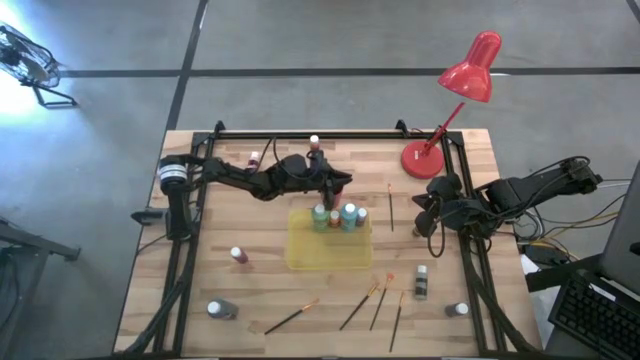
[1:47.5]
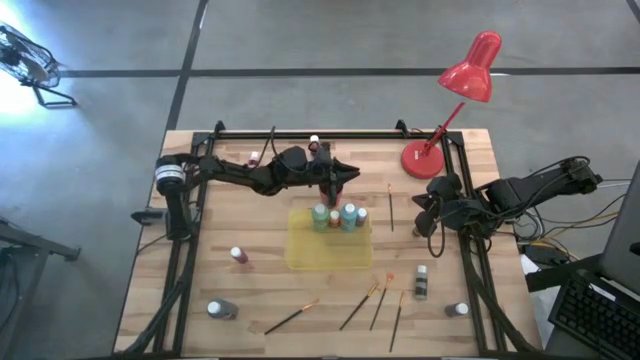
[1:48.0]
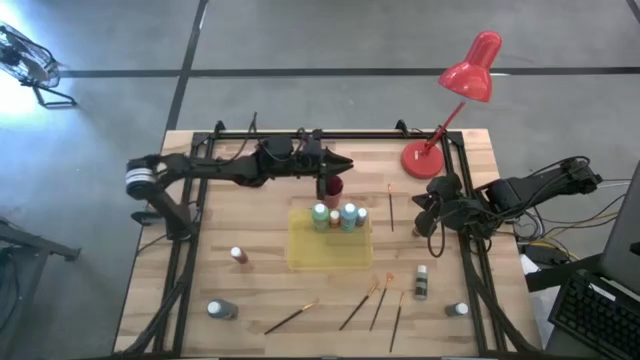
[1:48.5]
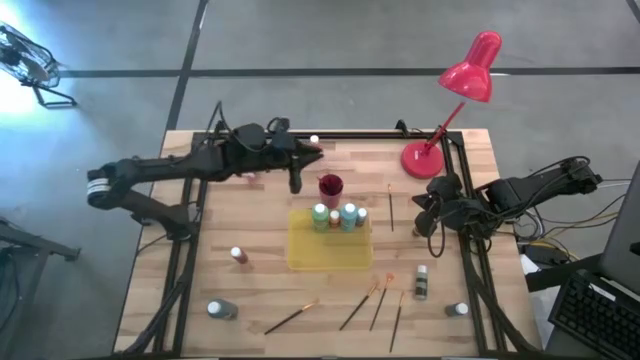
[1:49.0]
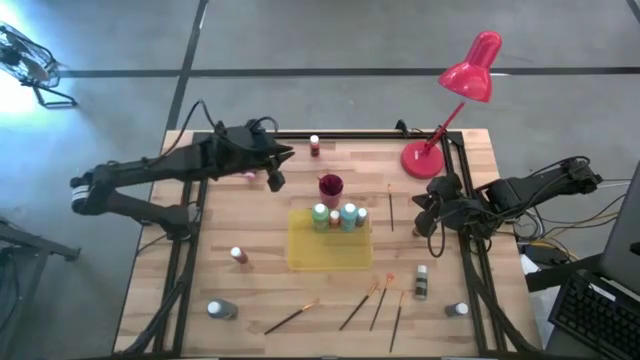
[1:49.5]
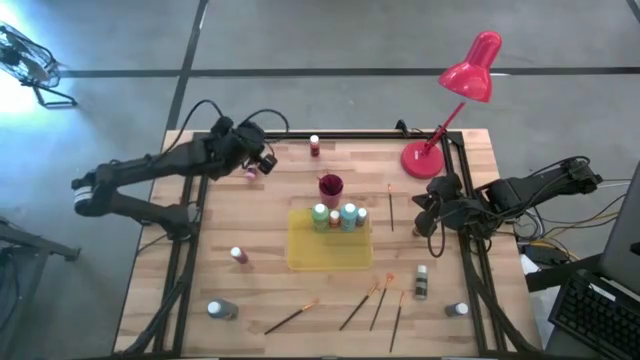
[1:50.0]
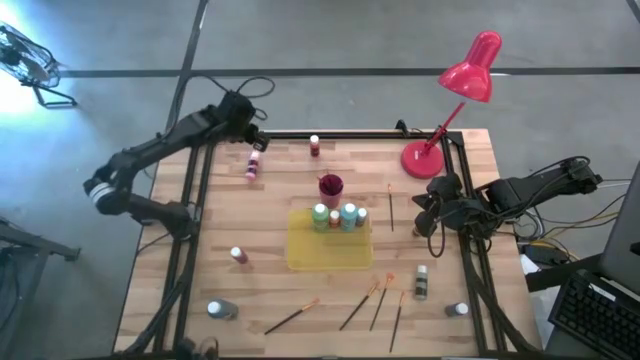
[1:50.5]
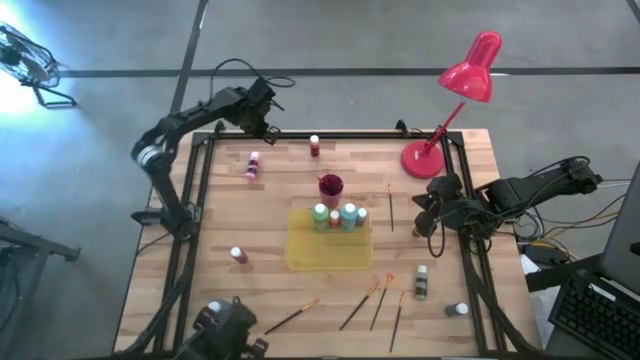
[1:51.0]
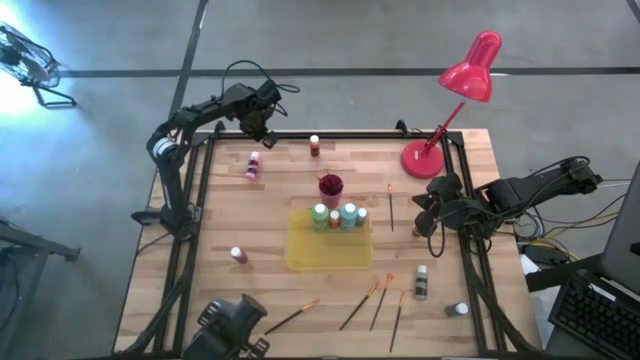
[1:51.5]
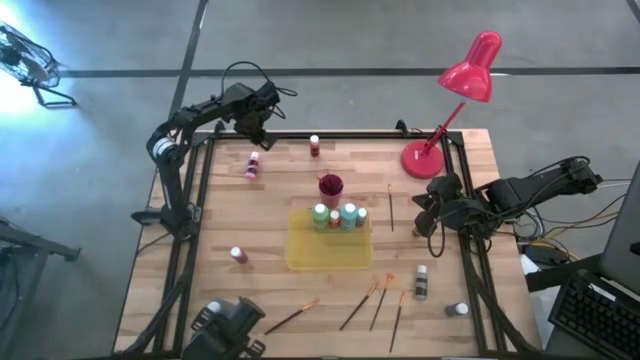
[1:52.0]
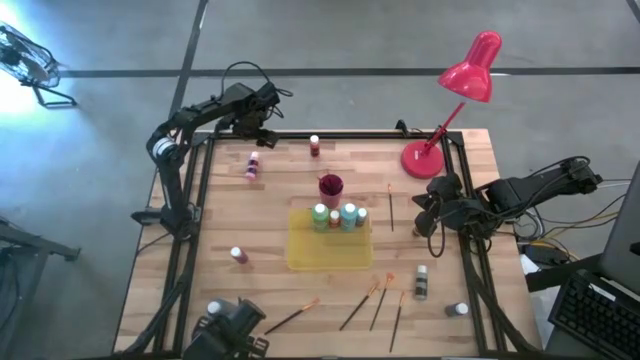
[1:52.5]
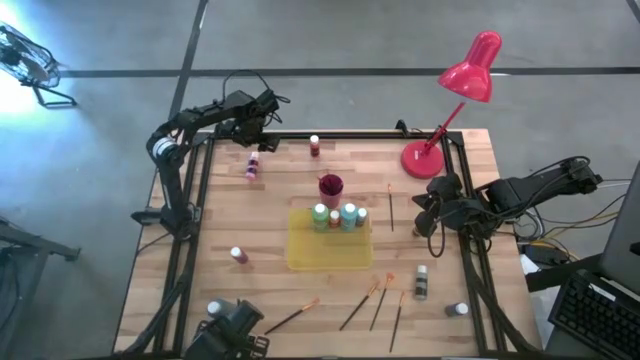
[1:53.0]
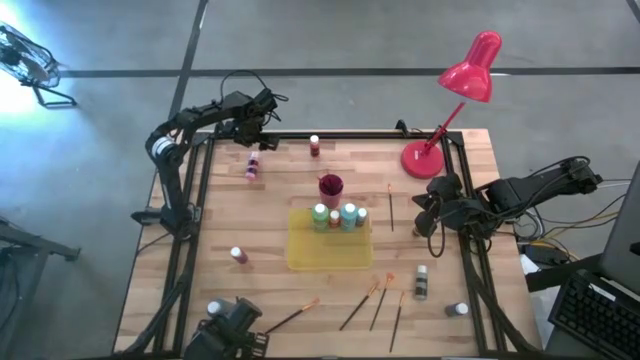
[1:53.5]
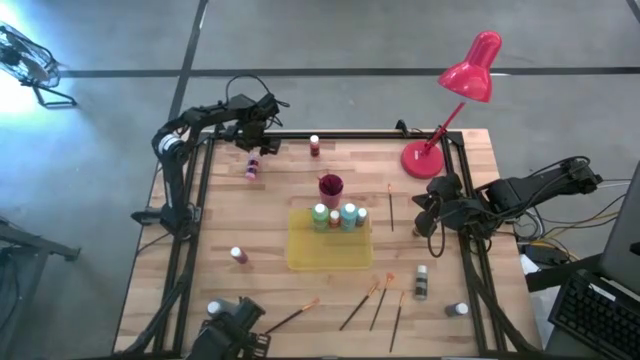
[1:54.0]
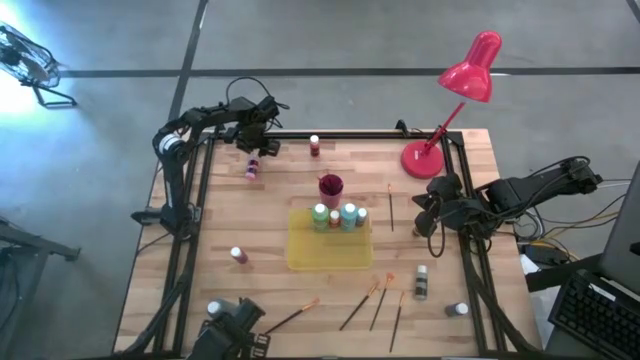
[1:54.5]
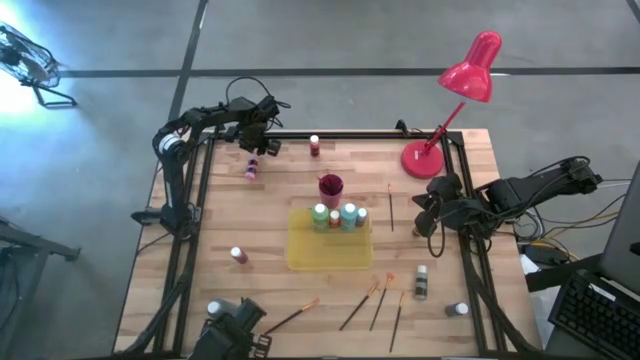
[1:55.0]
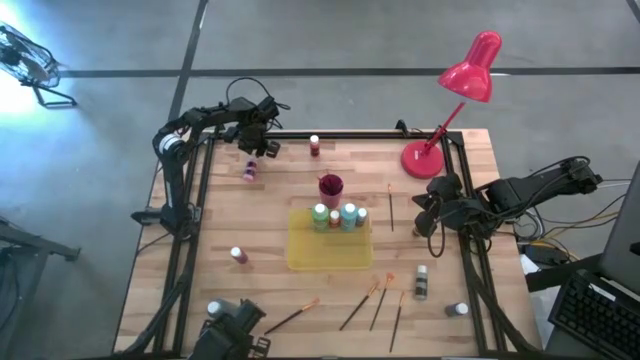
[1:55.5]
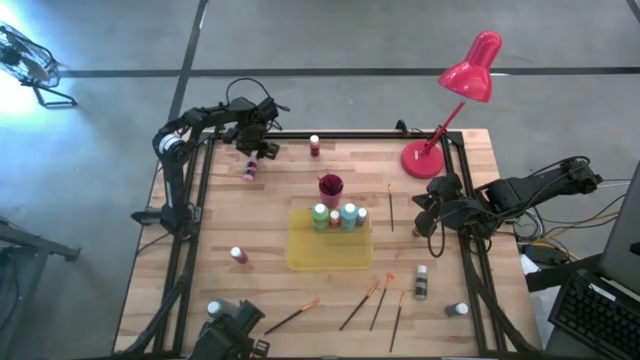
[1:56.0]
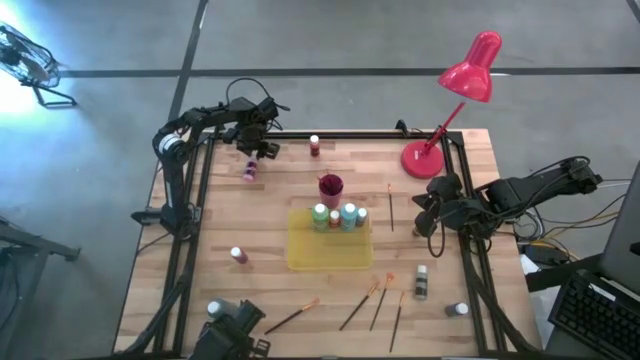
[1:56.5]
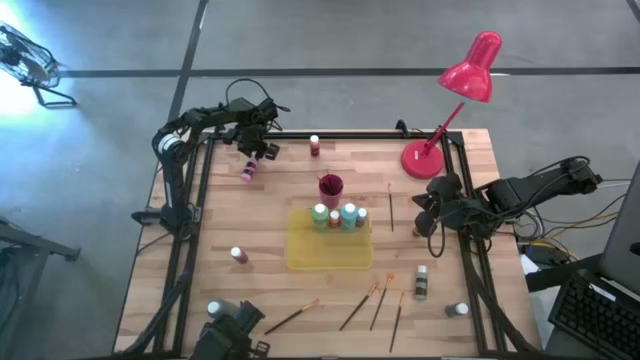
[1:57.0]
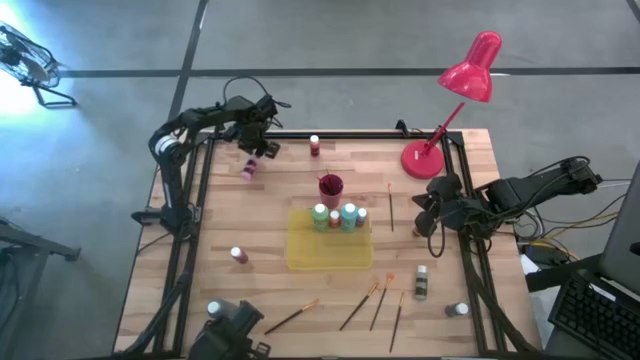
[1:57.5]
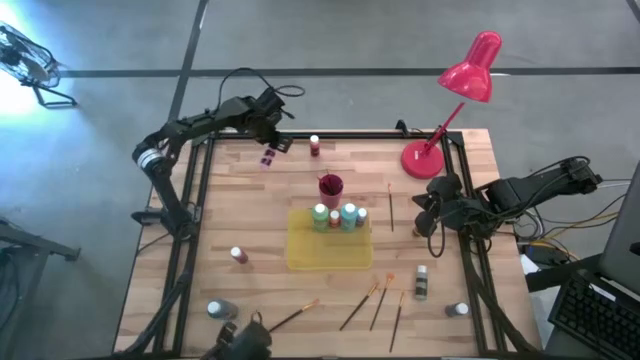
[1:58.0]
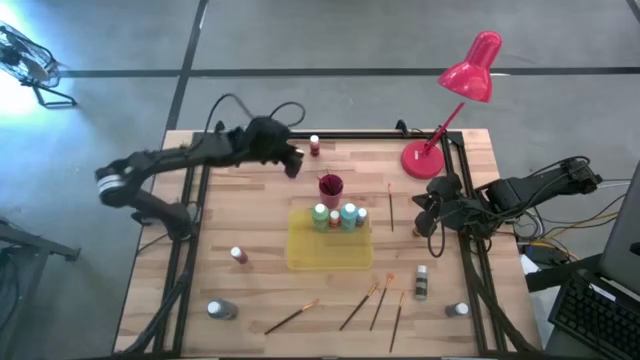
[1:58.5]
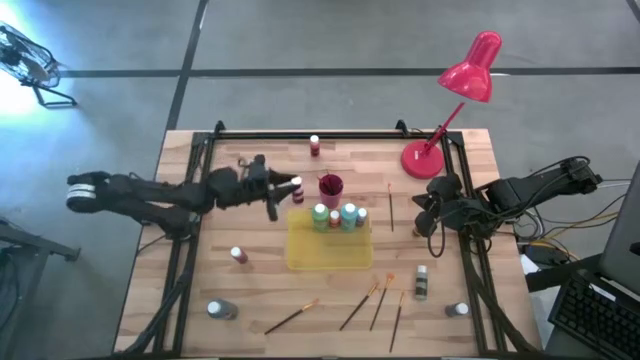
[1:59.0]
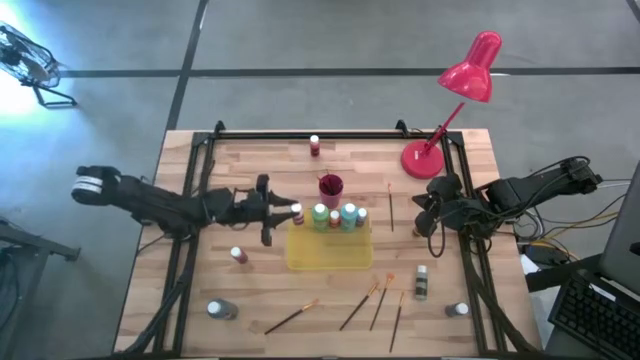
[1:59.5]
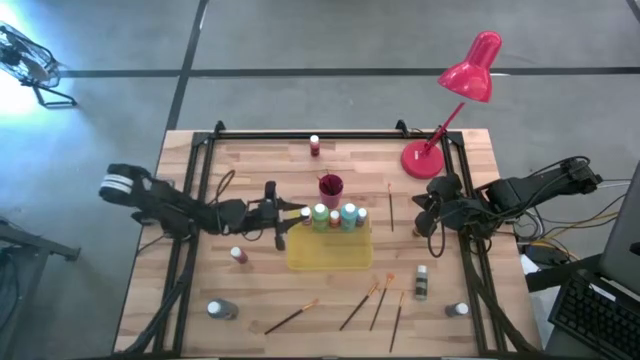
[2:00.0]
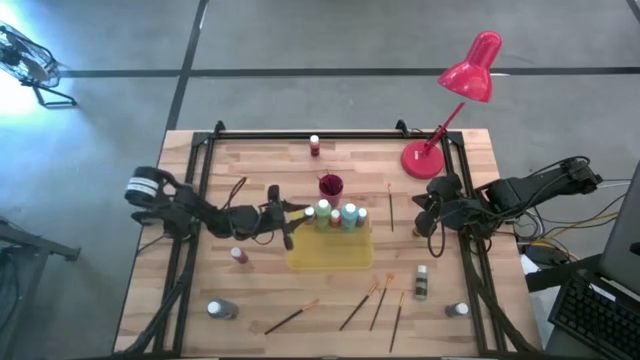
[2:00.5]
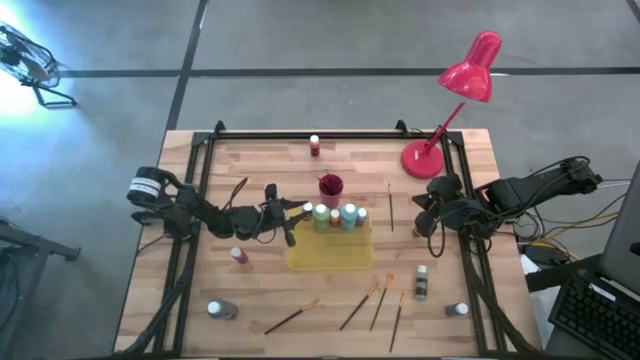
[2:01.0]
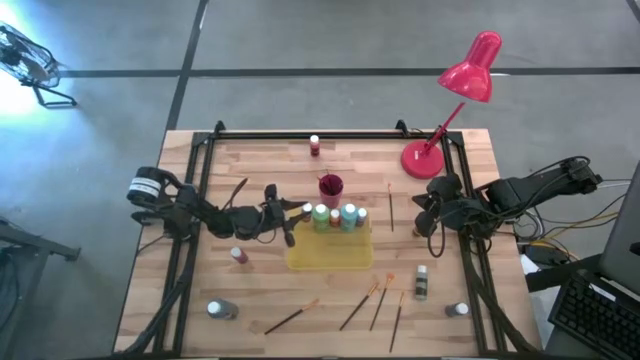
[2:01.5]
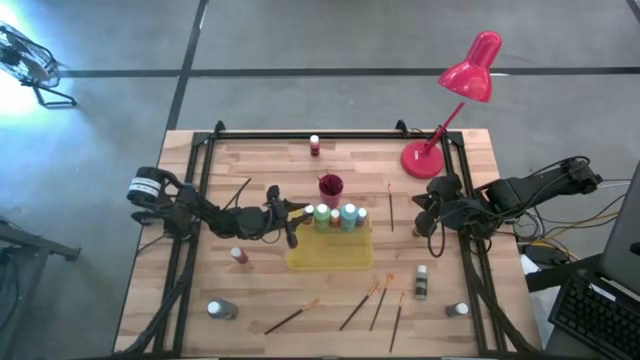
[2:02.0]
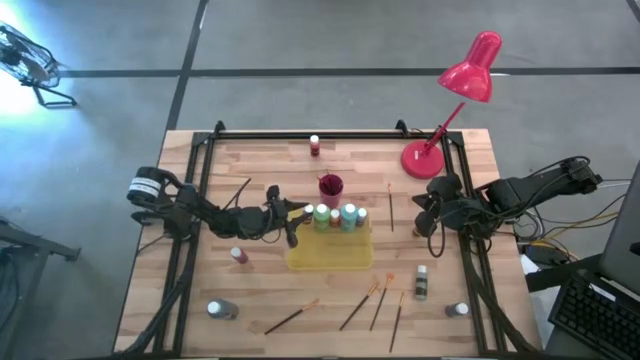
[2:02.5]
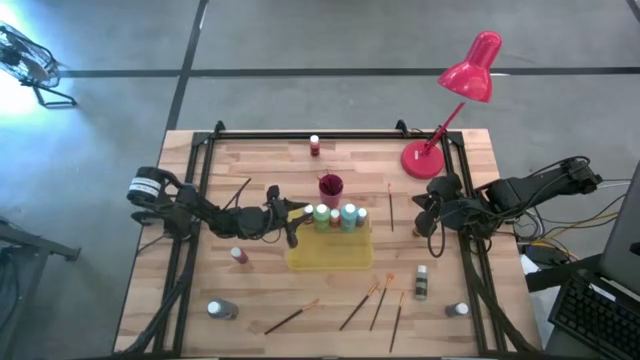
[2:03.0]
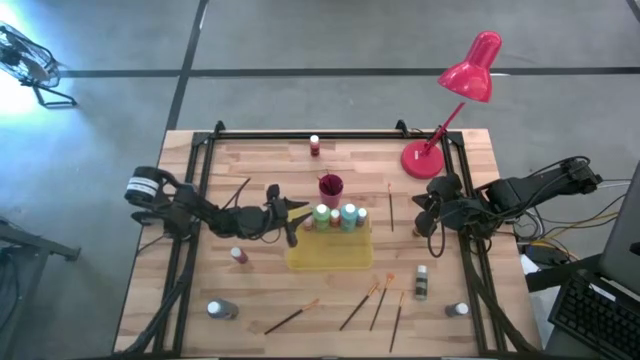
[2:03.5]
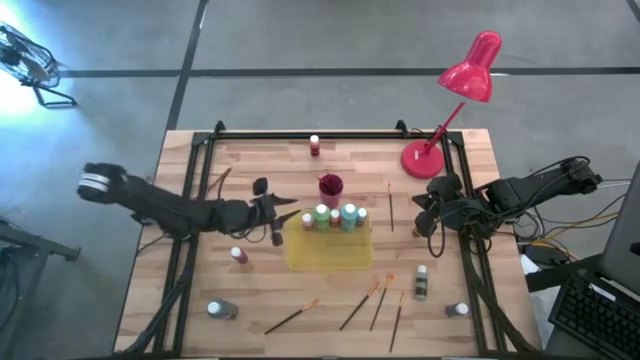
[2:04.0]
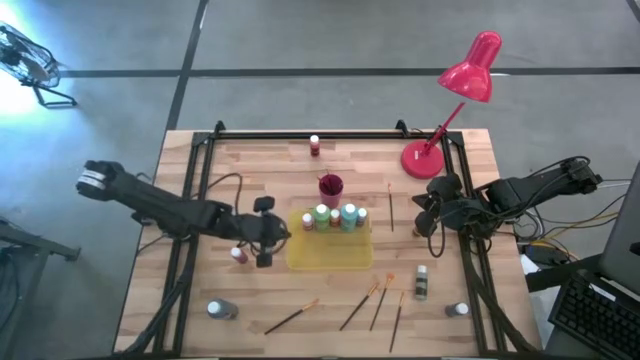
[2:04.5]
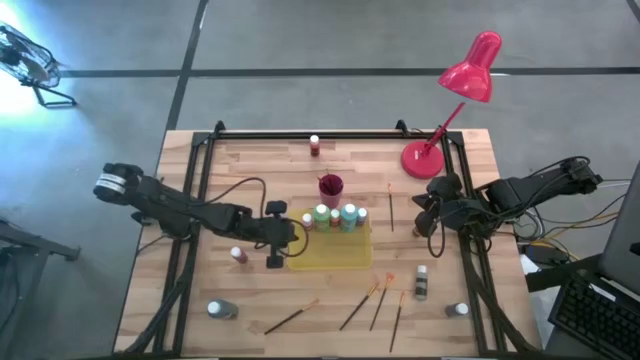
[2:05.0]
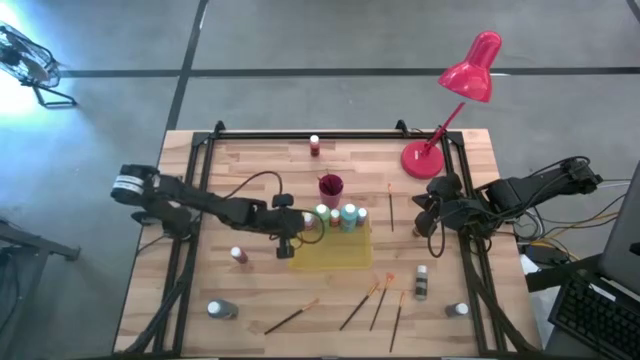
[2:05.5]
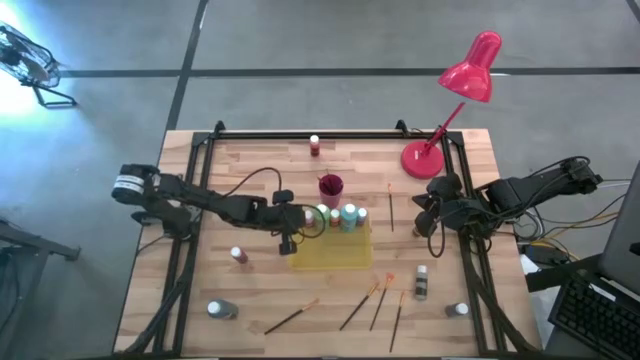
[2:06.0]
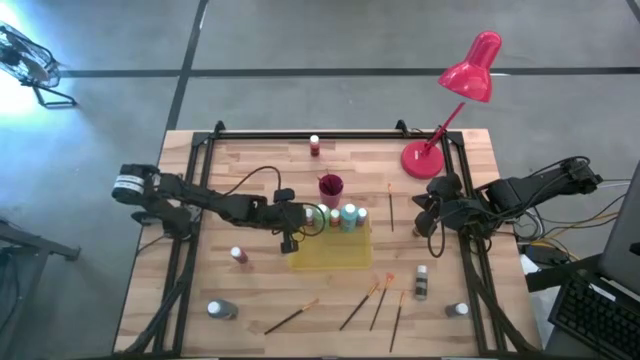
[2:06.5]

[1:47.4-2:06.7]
Task: Pick & Place Paint Supplies
Put the small pink paint bottle into the yellow bin

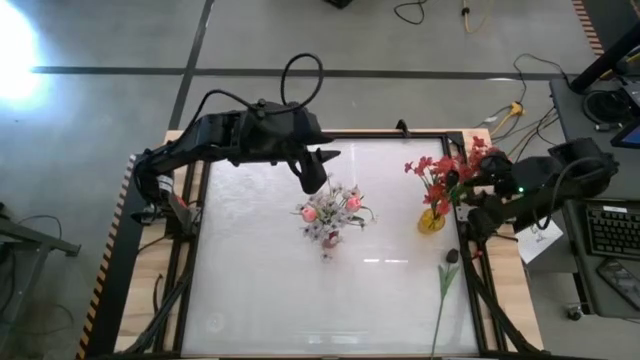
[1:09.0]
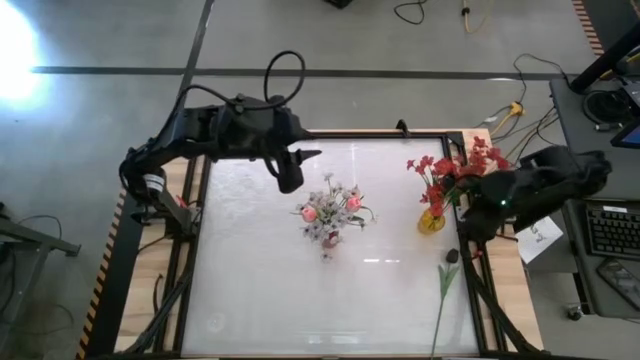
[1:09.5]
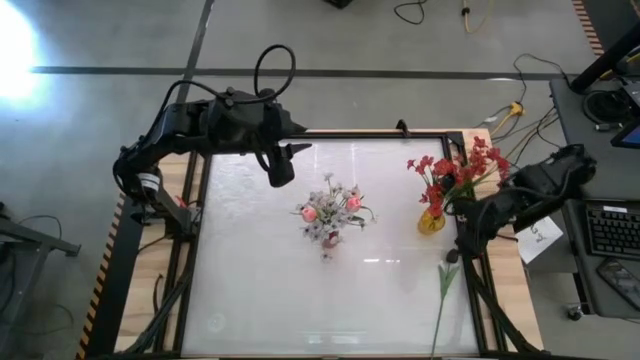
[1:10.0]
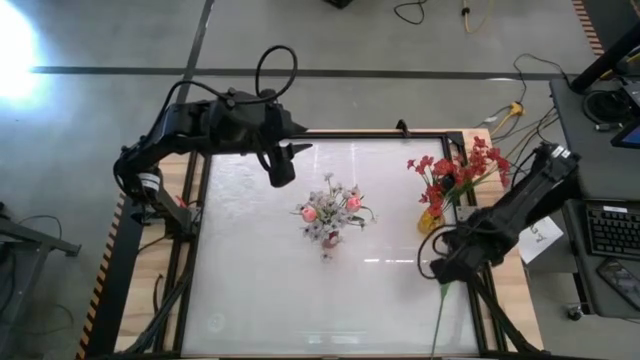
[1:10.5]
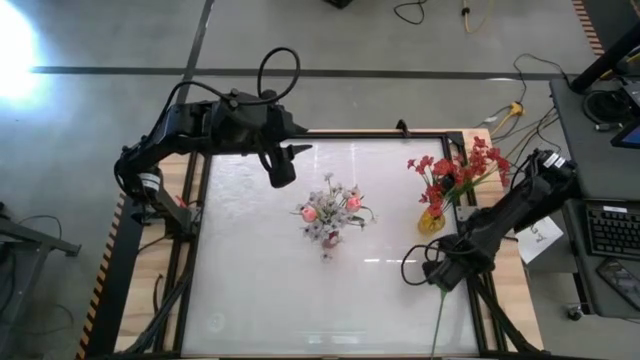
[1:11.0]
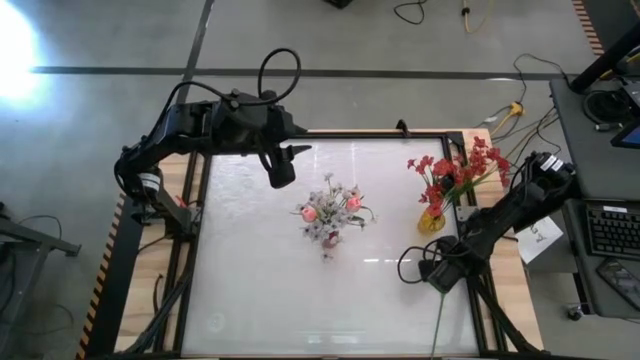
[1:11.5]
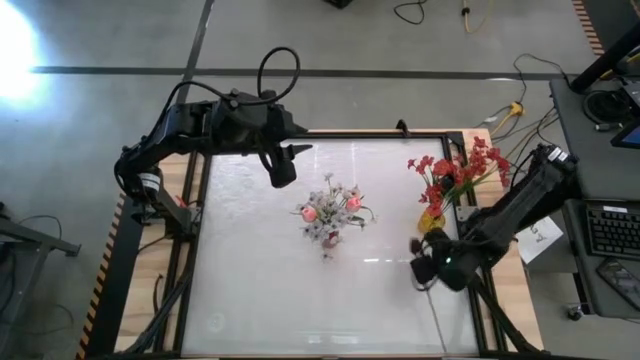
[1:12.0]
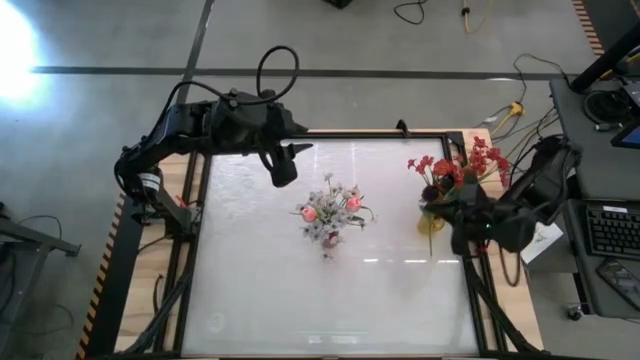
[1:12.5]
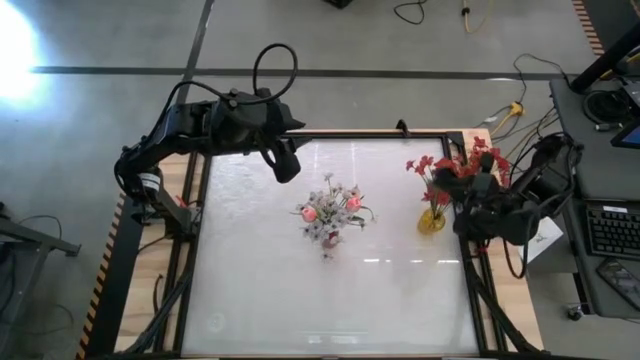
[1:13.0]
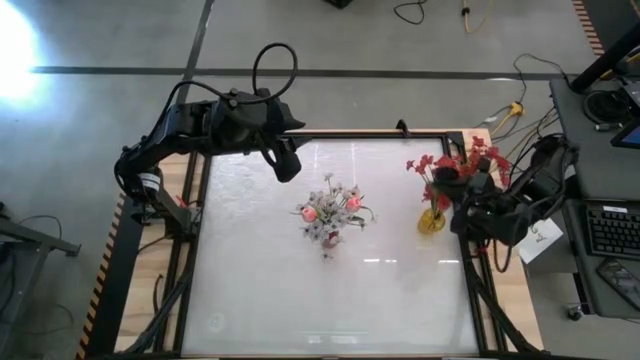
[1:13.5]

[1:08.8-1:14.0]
Task: Sort flowers into vase by color
Put the black flower into the yellow vase
